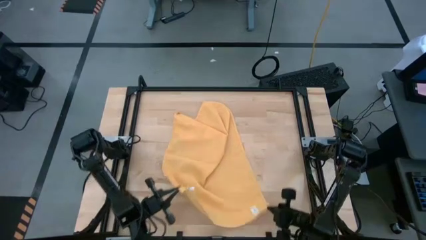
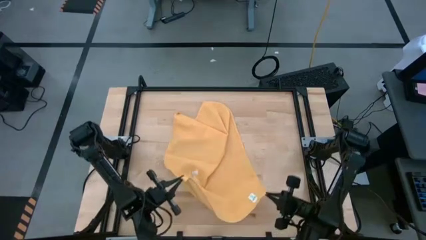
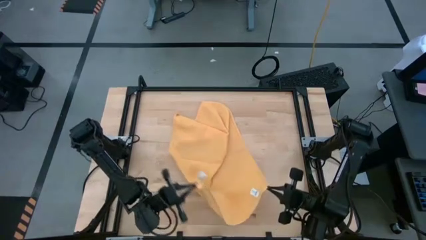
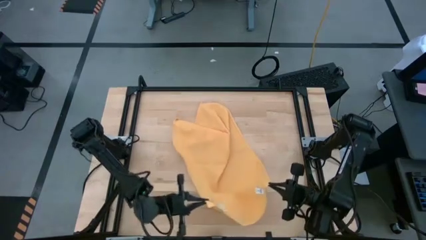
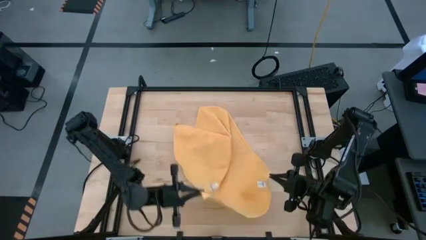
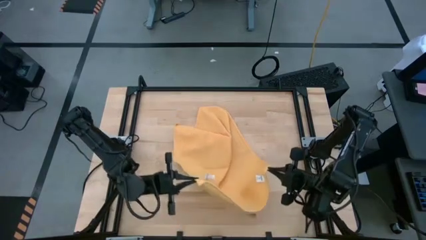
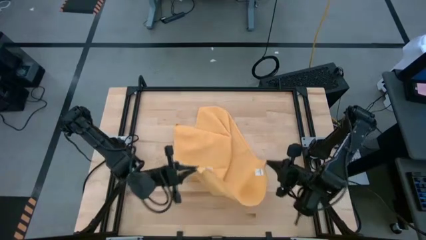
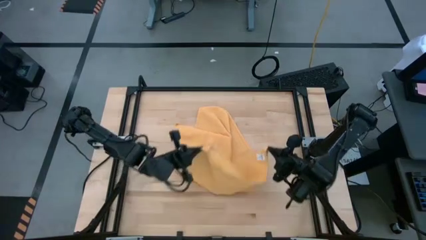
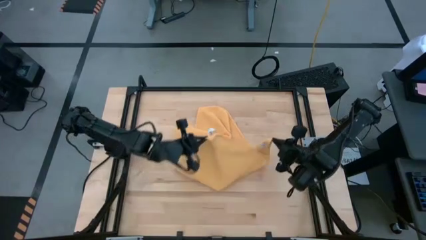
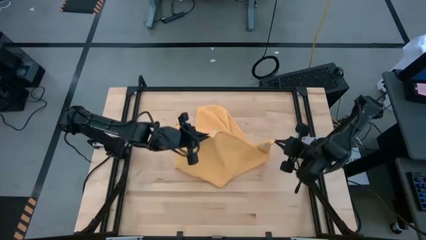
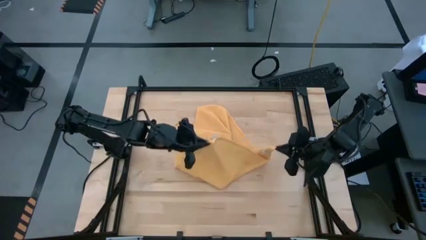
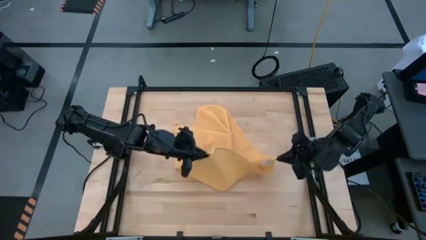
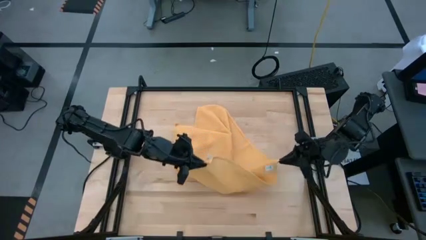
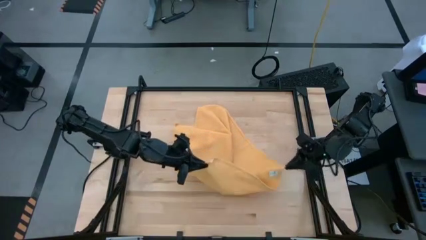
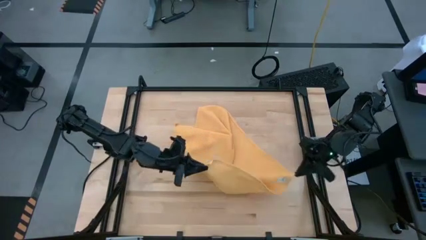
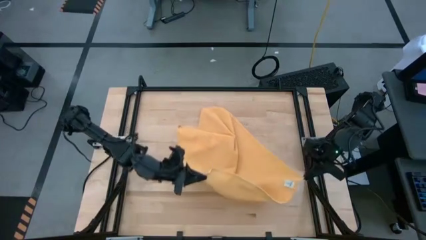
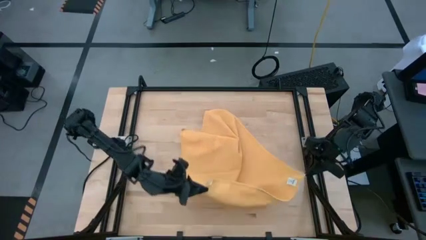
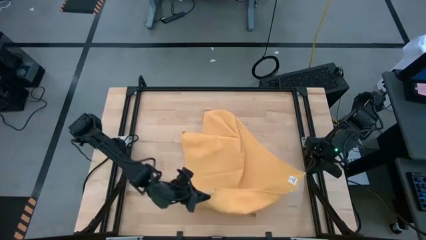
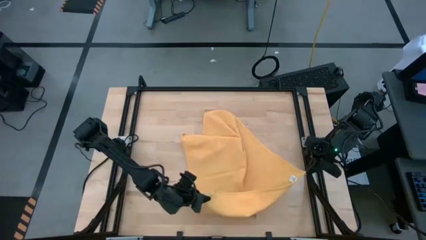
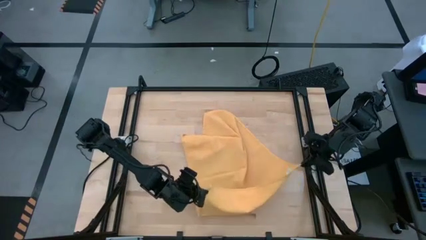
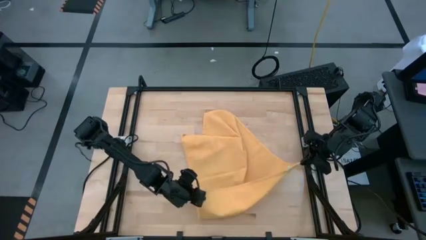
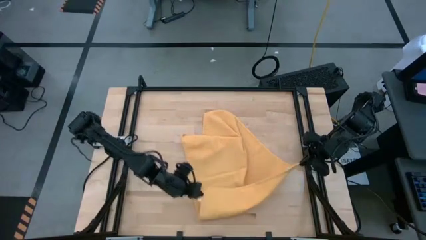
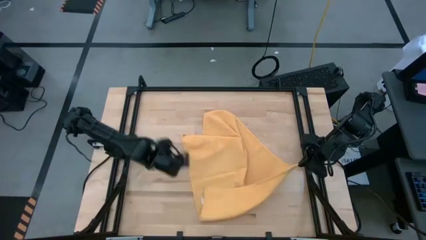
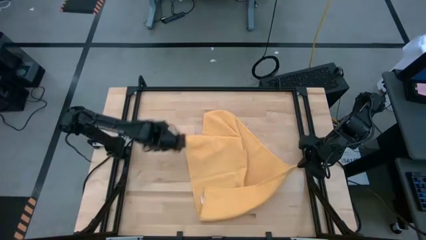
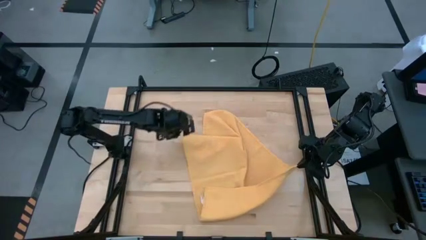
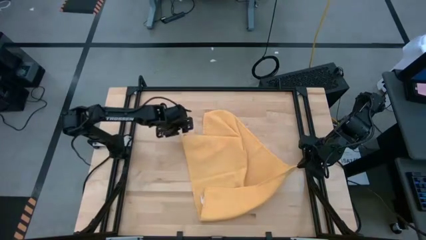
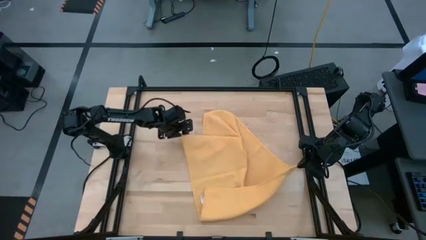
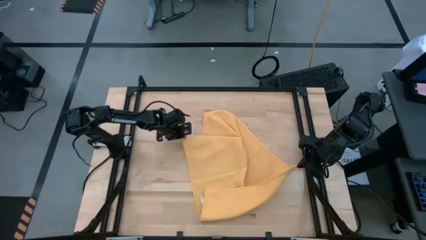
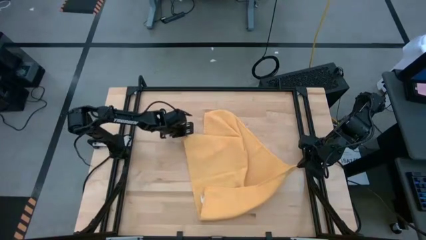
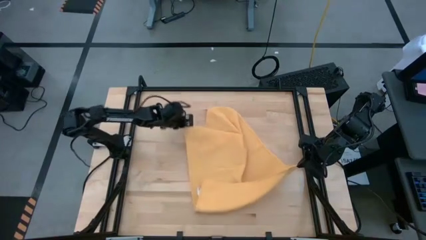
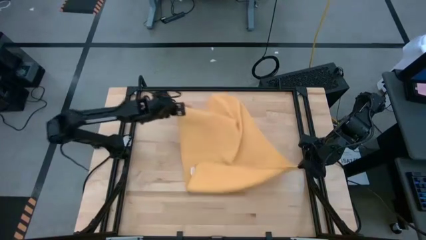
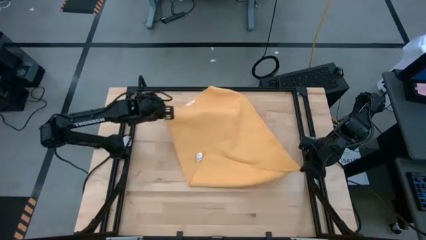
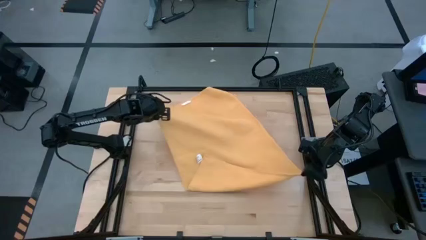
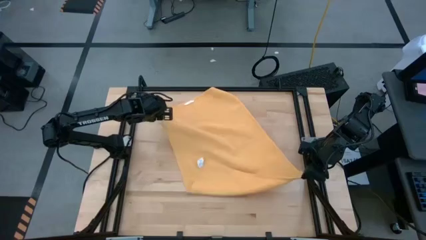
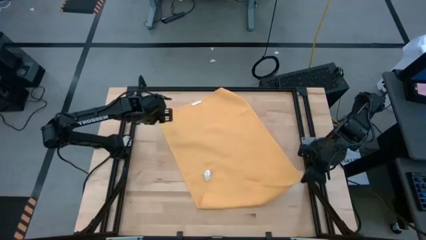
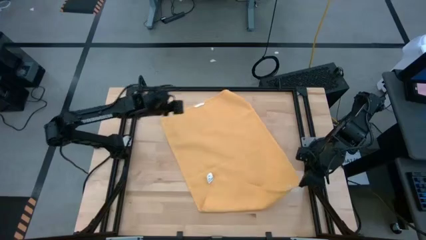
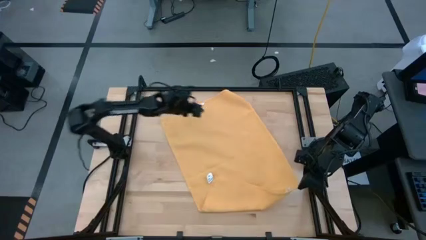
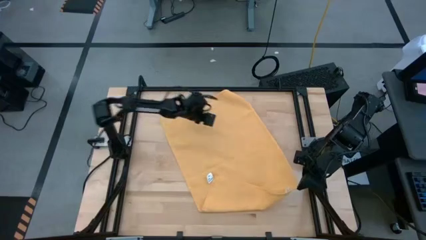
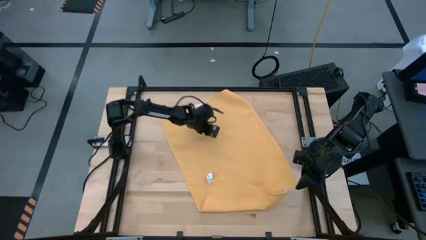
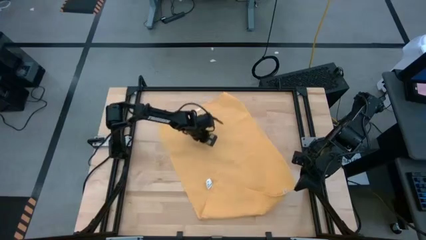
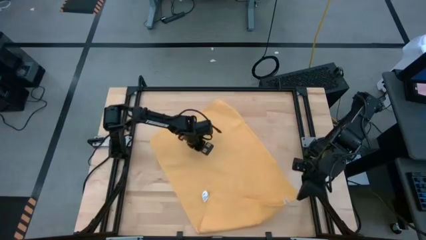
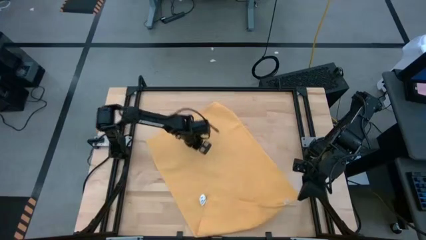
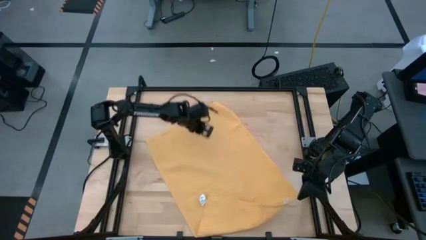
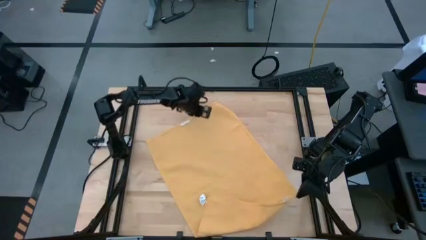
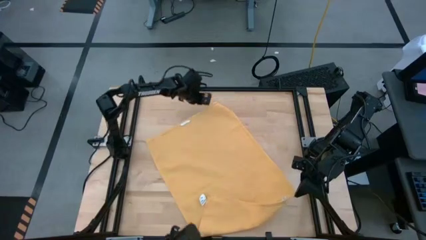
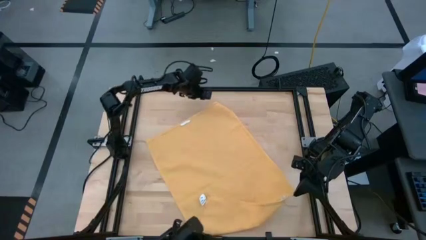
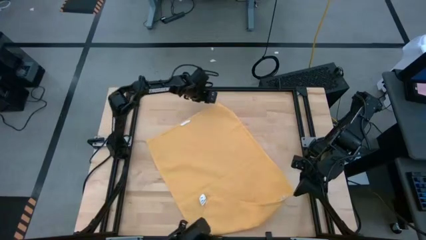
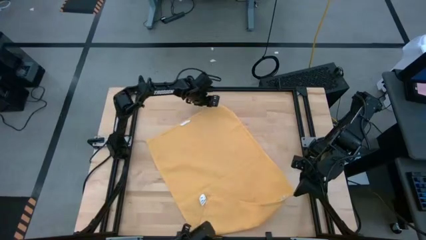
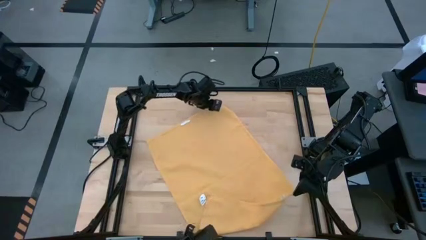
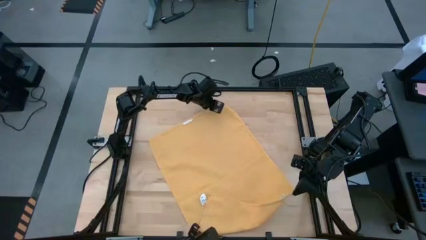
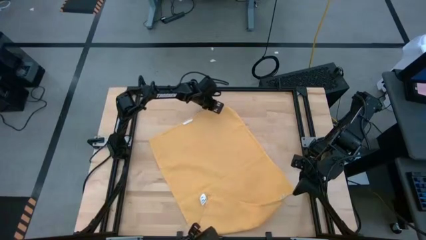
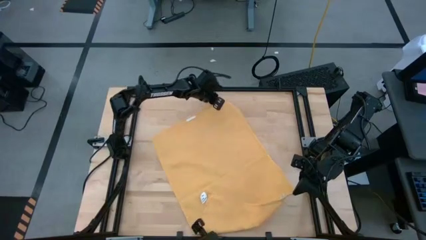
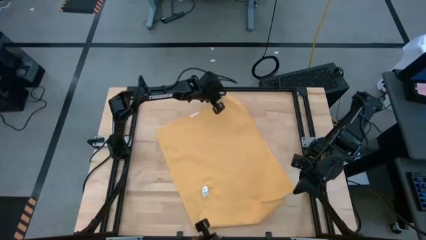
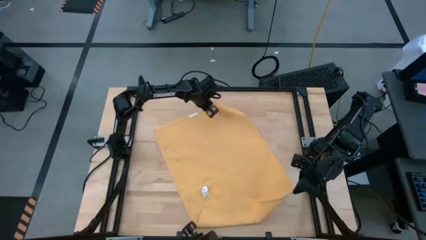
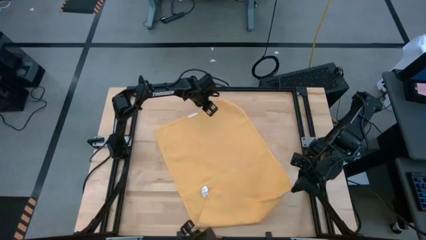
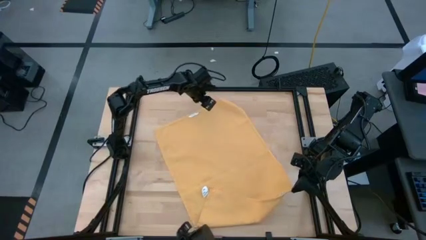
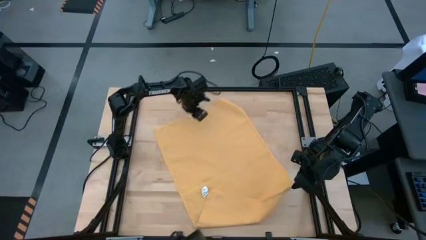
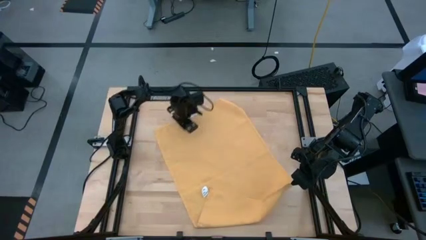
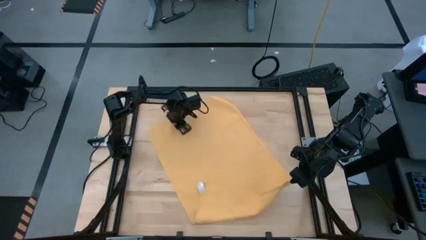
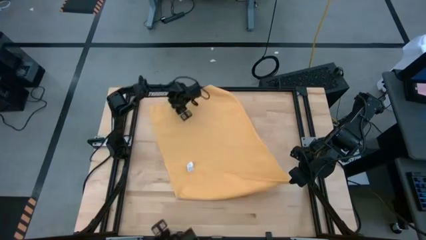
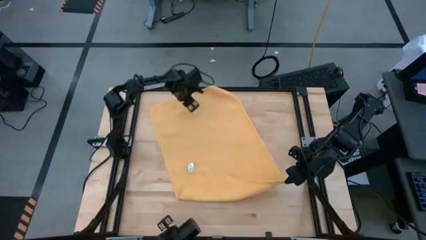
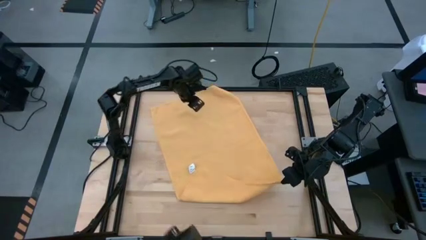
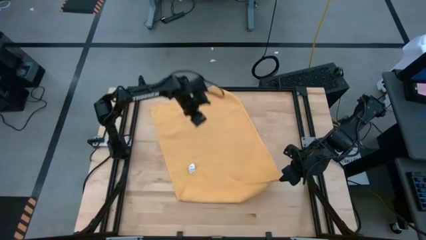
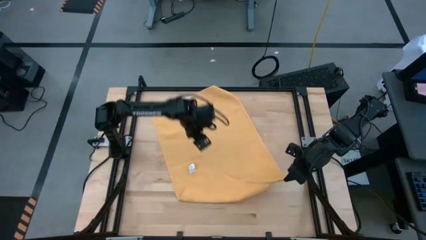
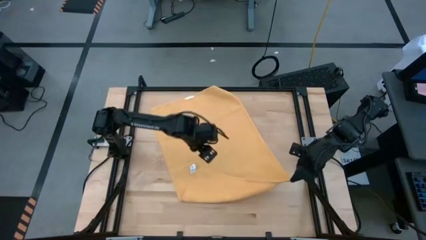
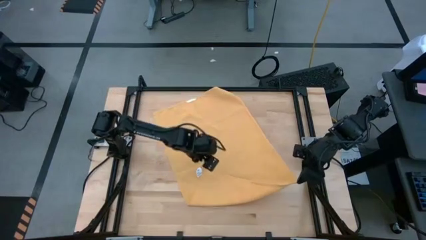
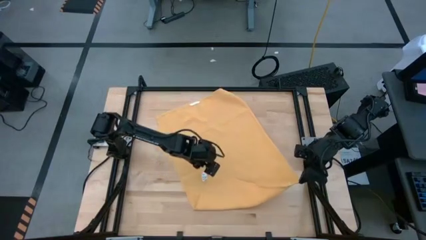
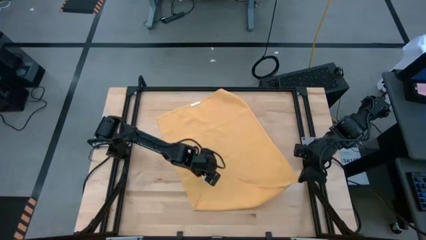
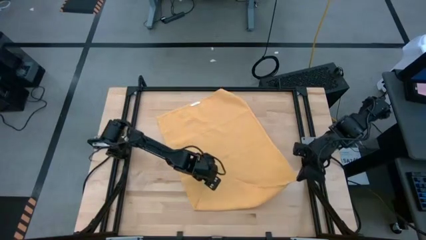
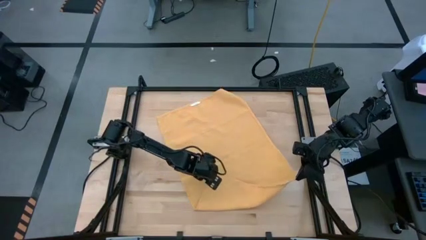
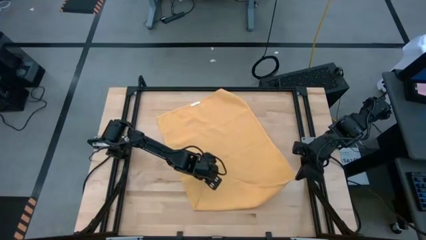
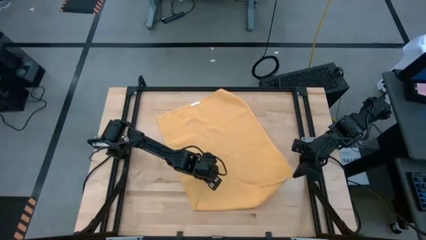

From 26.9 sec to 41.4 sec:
Task: Roll towel
Fold the yellow towel
